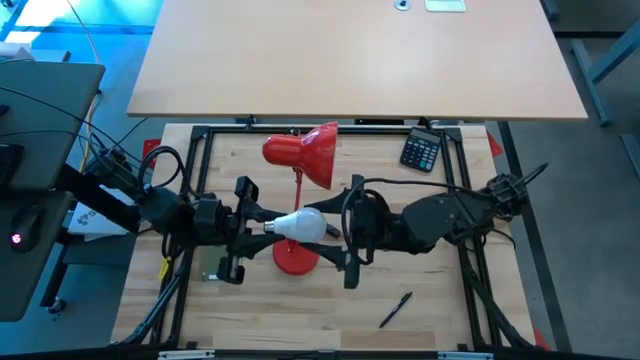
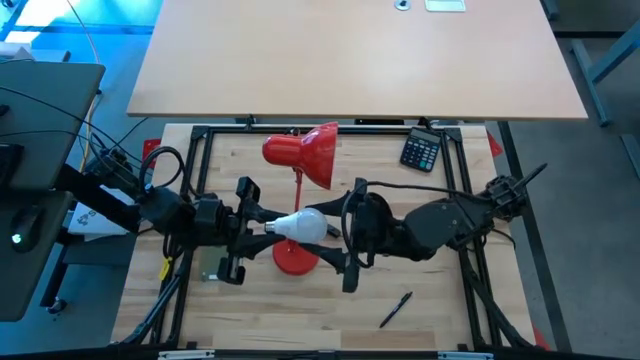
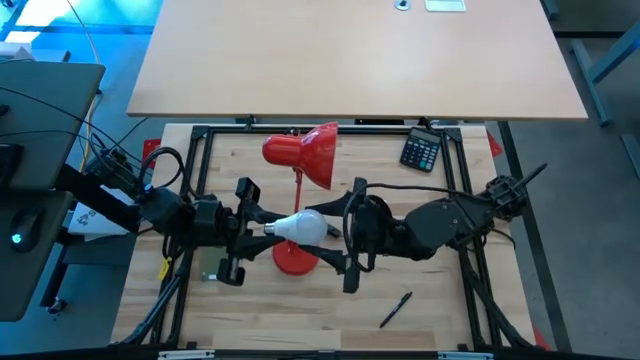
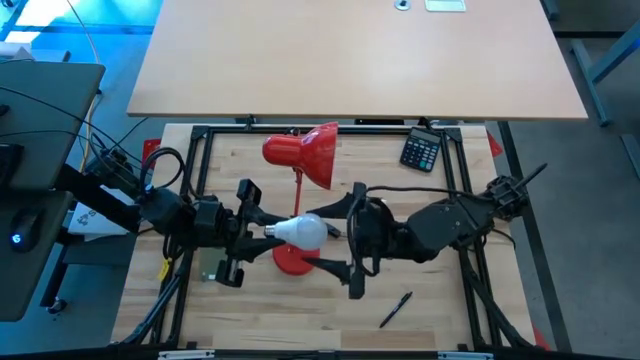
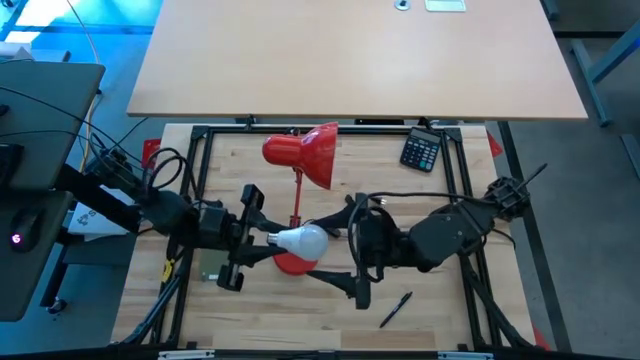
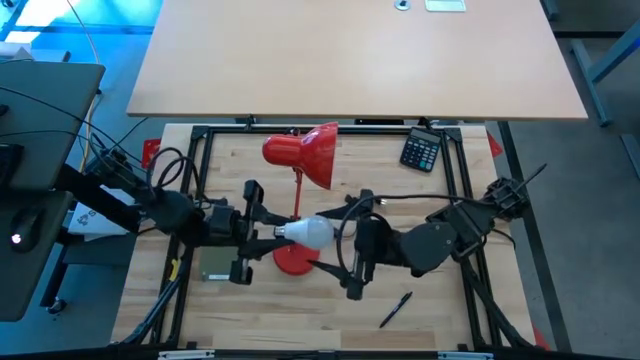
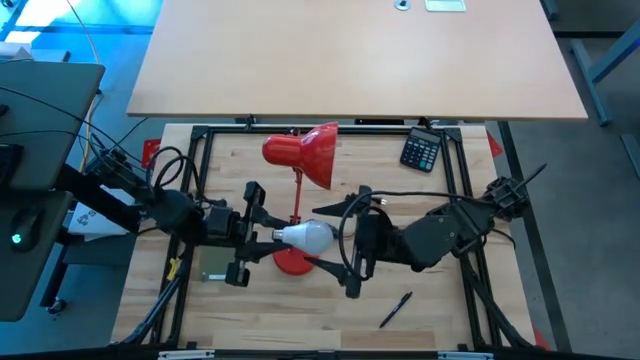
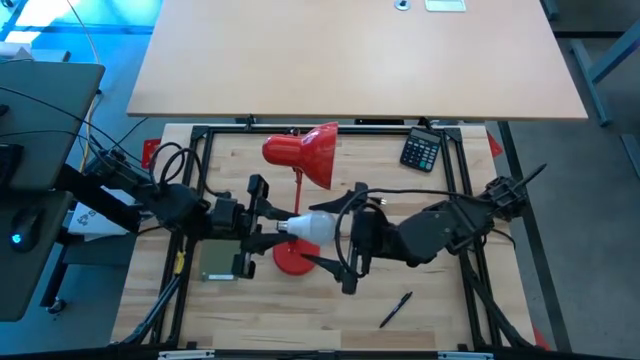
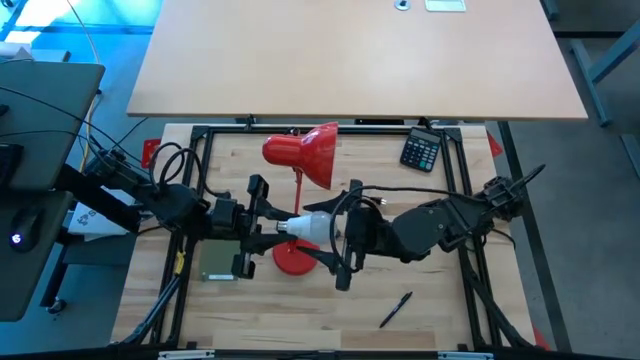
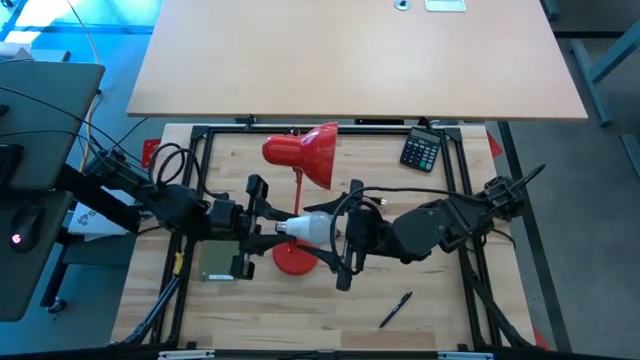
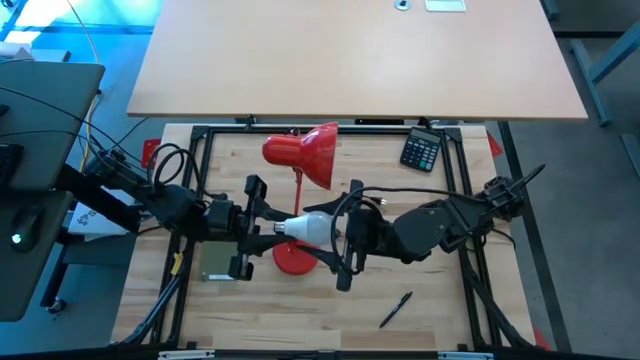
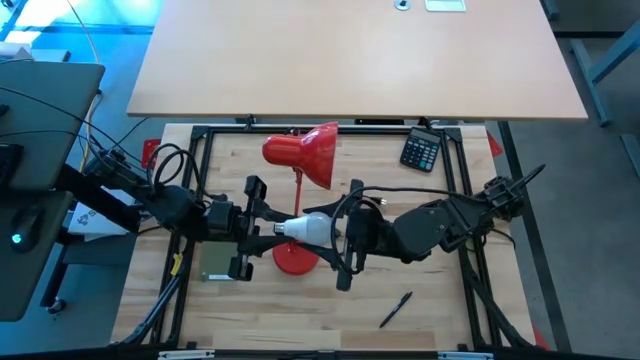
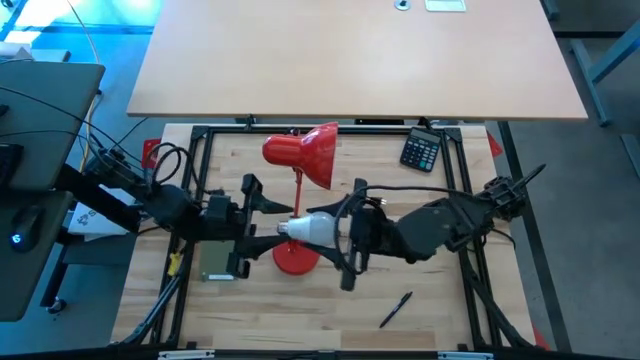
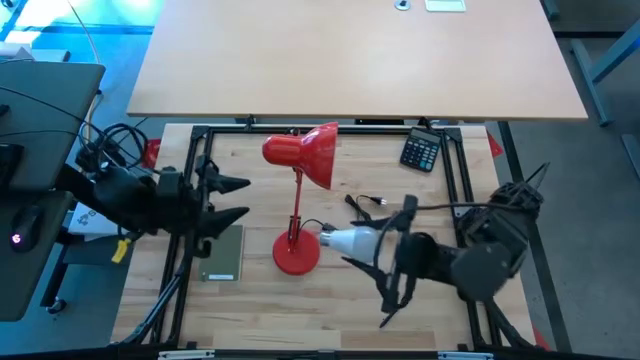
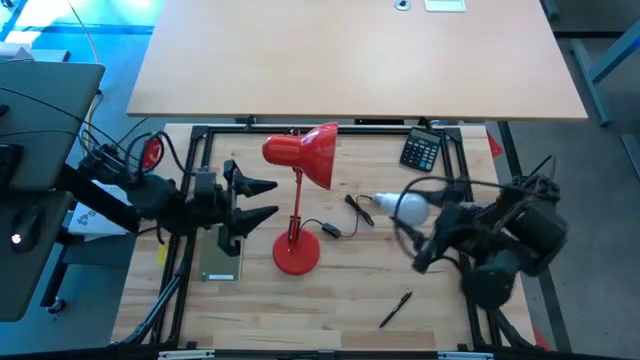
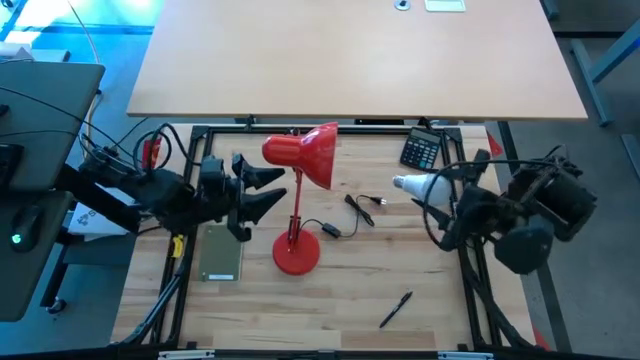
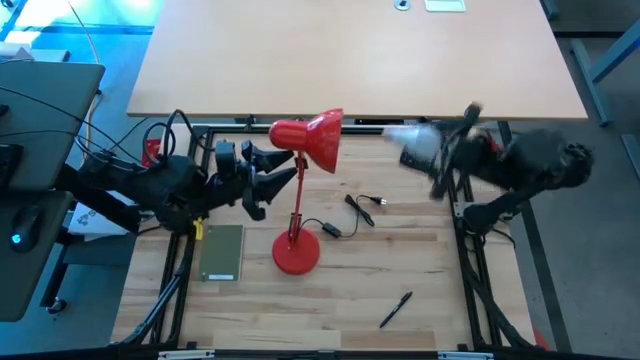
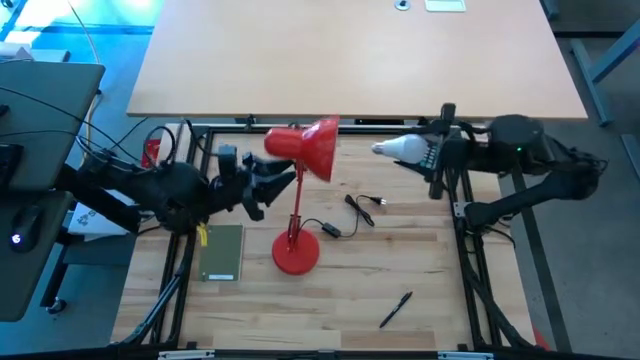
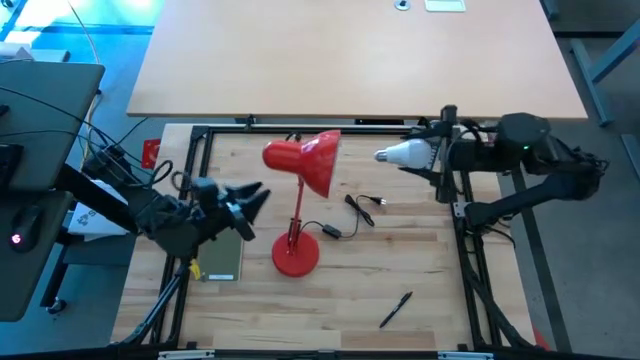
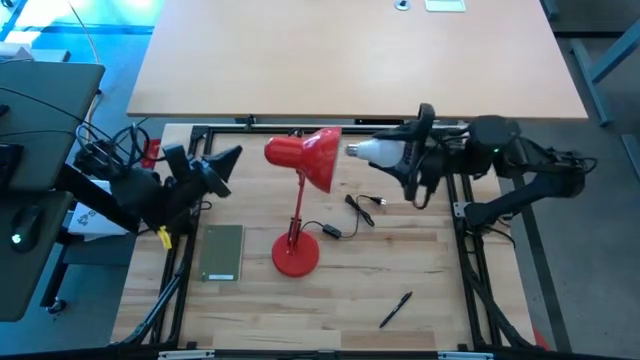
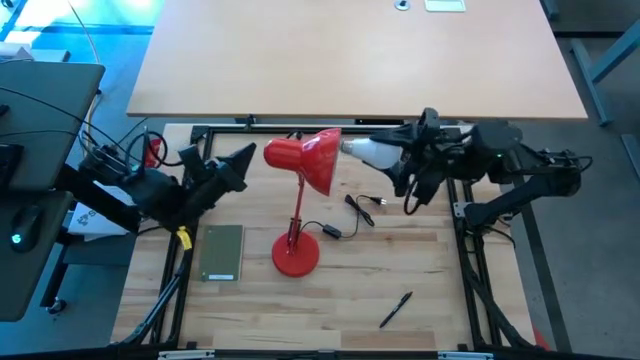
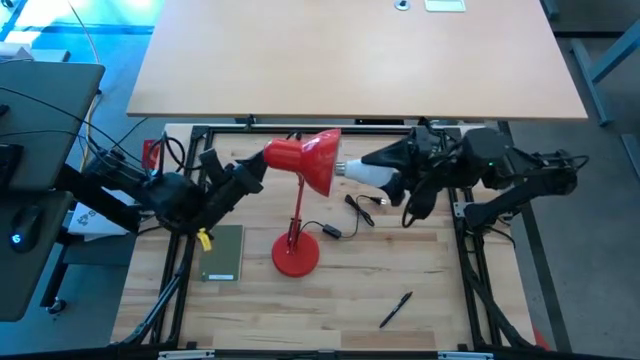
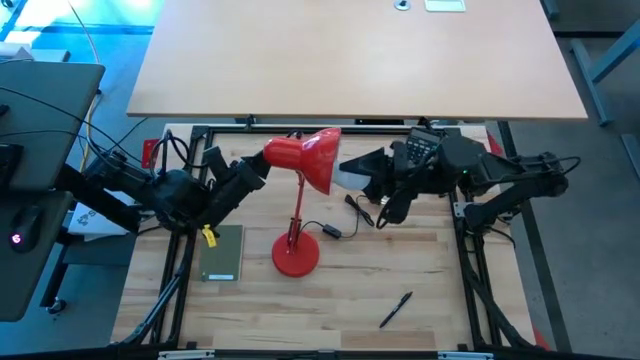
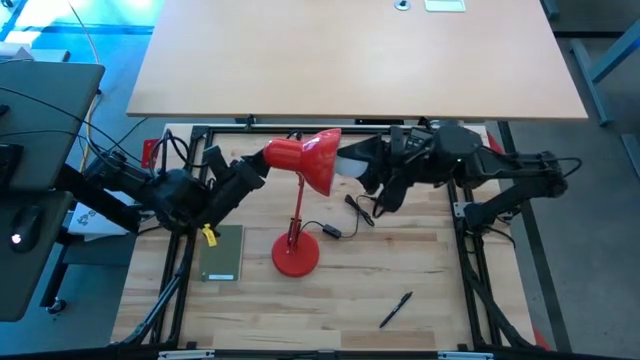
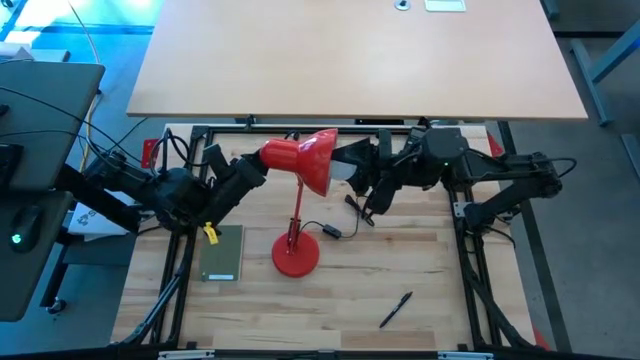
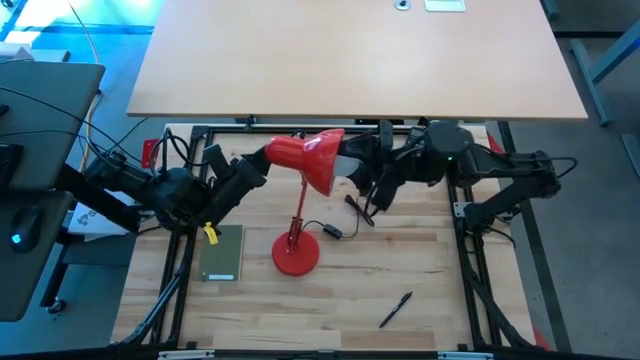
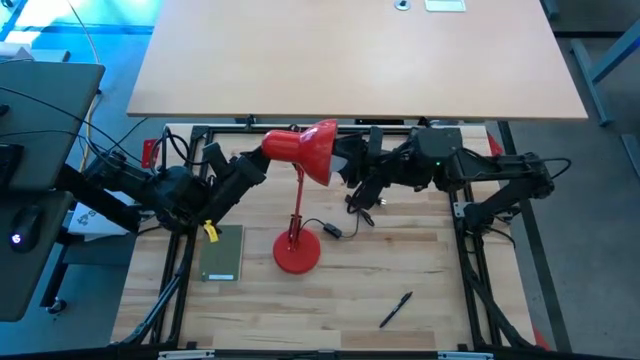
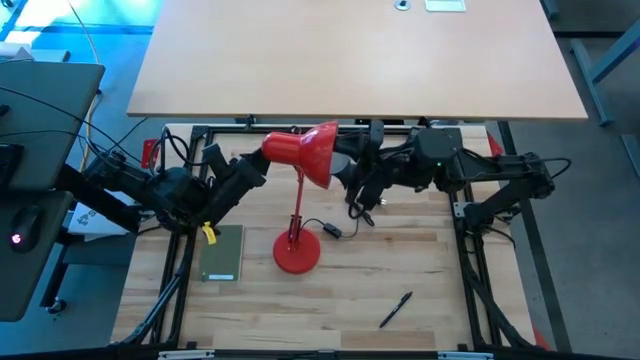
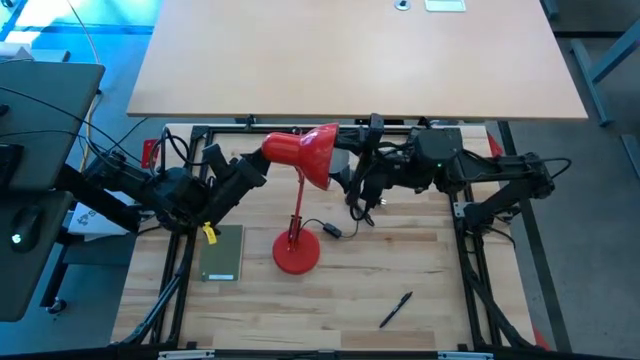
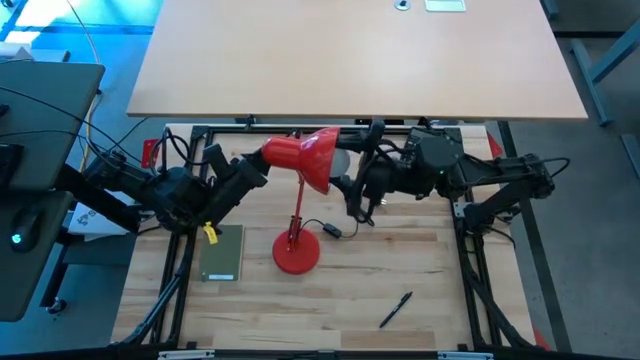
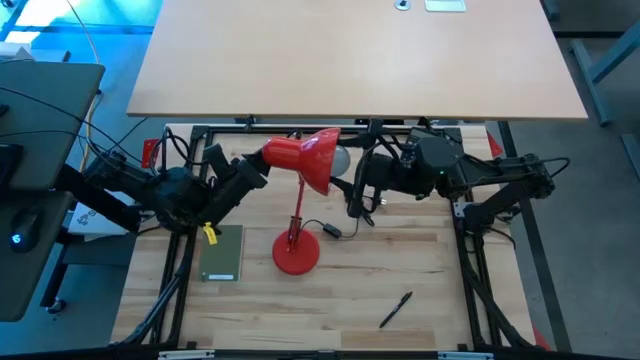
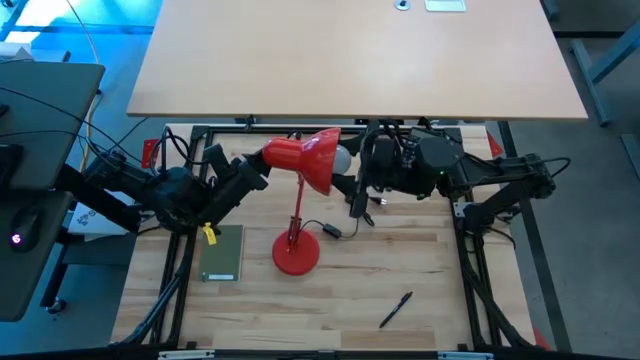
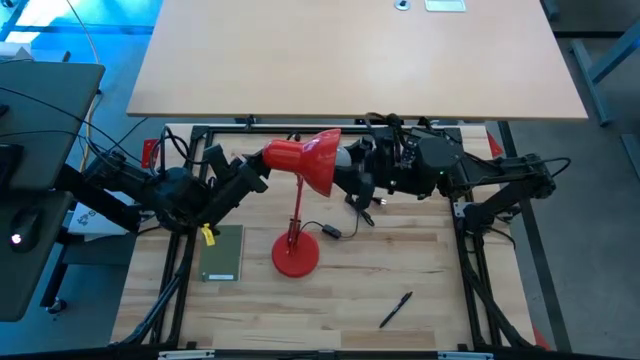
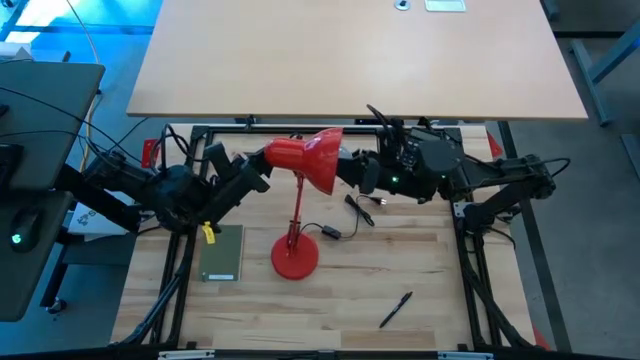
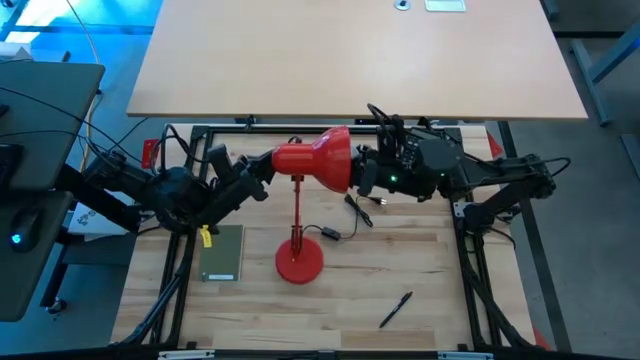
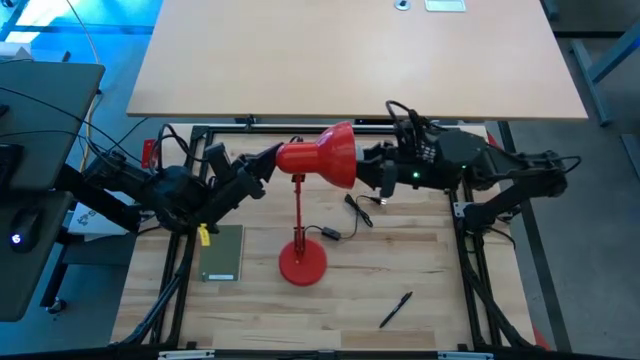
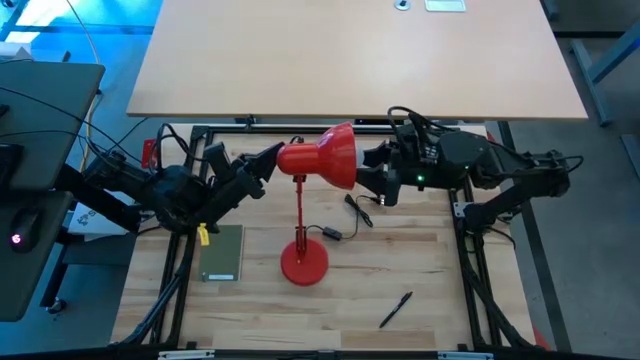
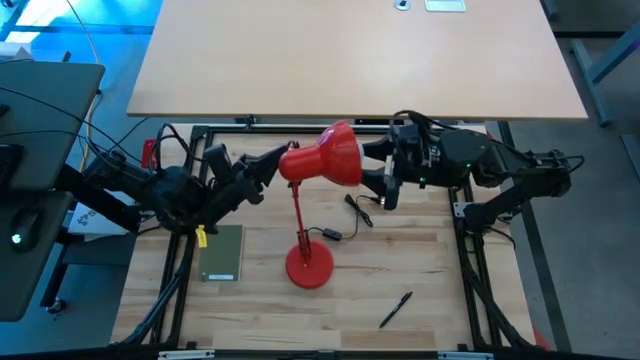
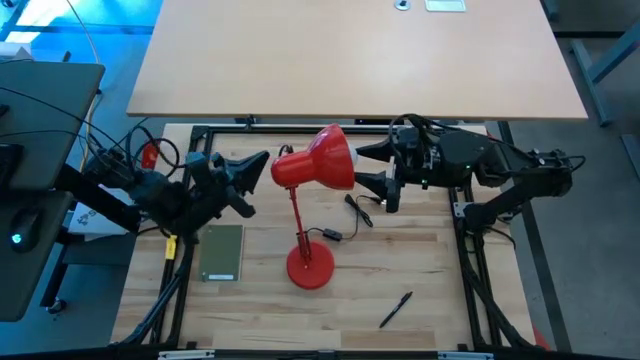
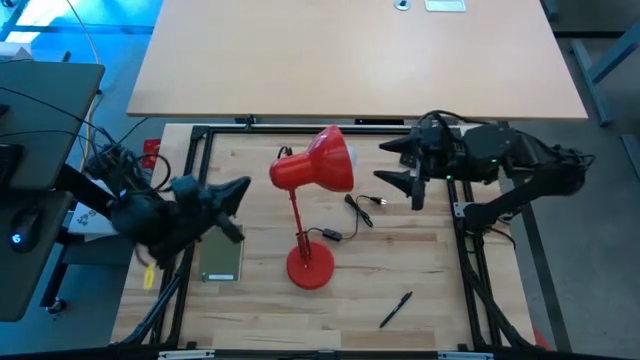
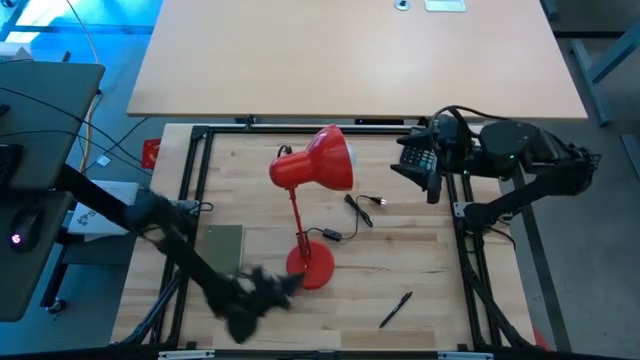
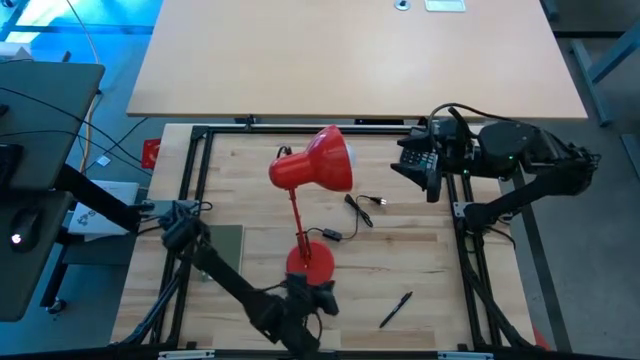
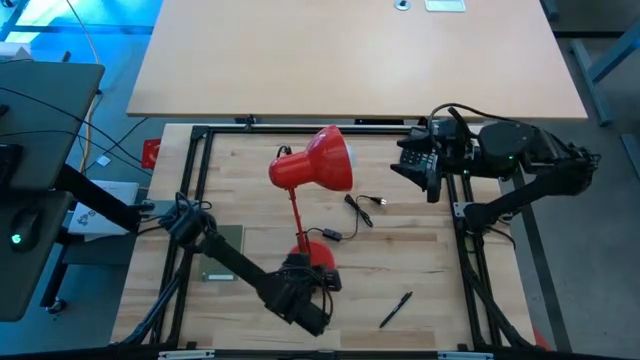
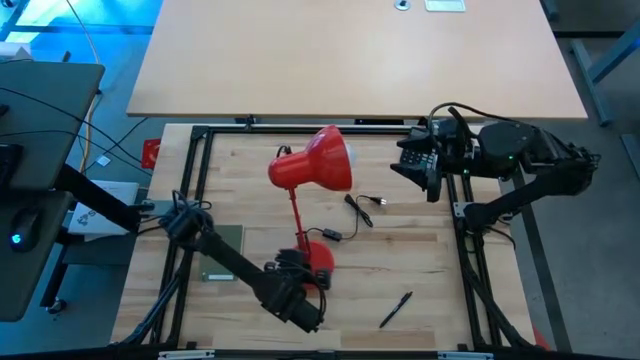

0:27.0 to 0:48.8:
Task: Screw lightbulb
Insert the white lightbulb into the red lamp
